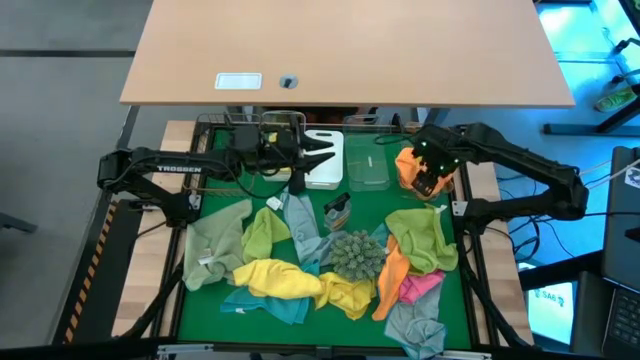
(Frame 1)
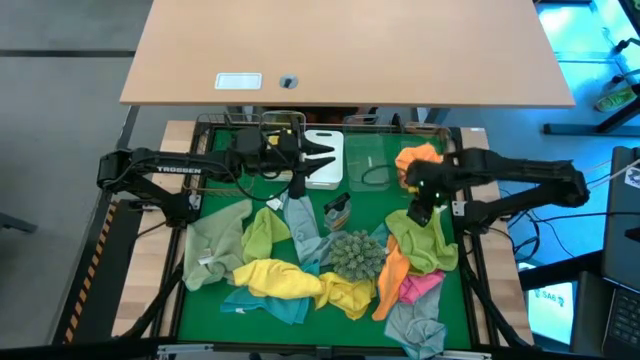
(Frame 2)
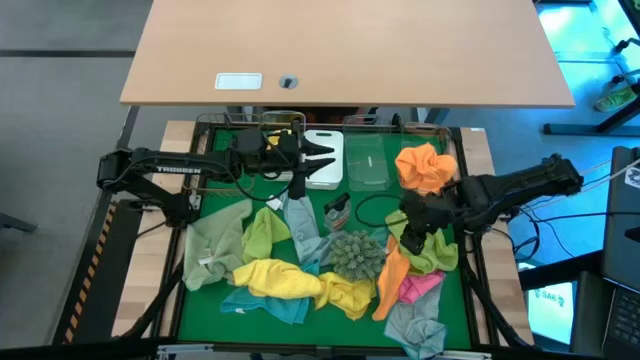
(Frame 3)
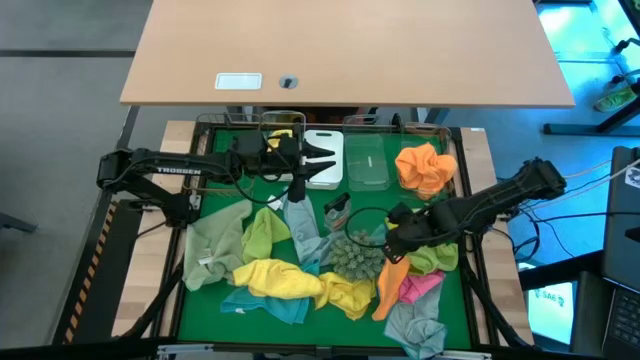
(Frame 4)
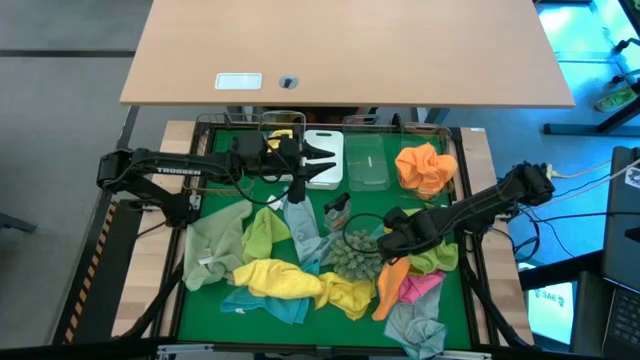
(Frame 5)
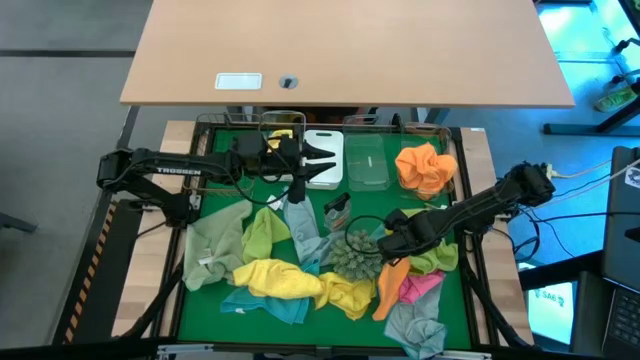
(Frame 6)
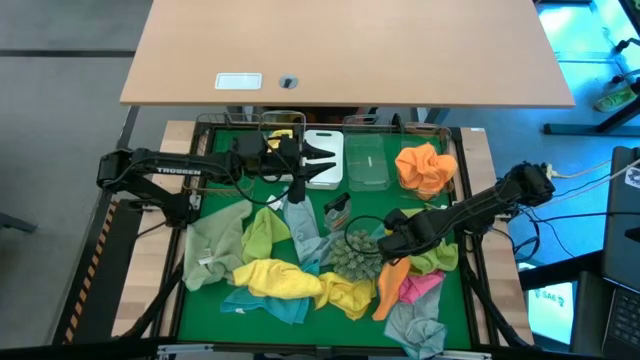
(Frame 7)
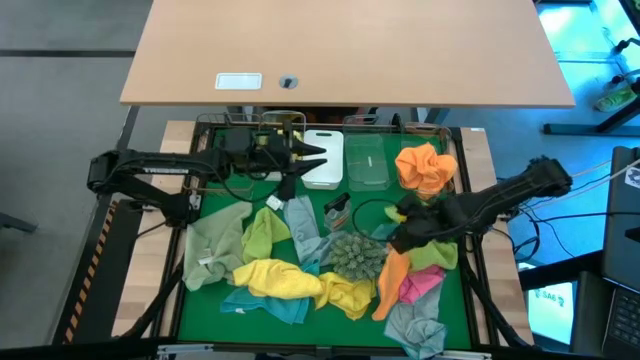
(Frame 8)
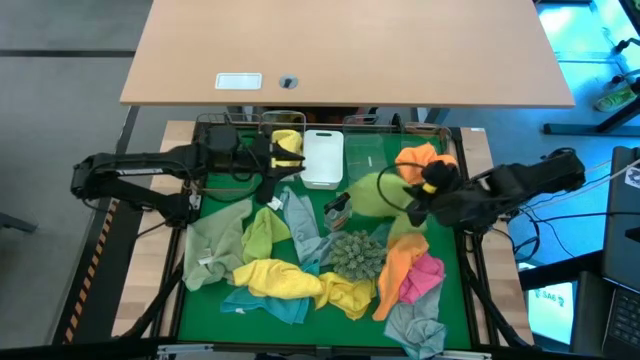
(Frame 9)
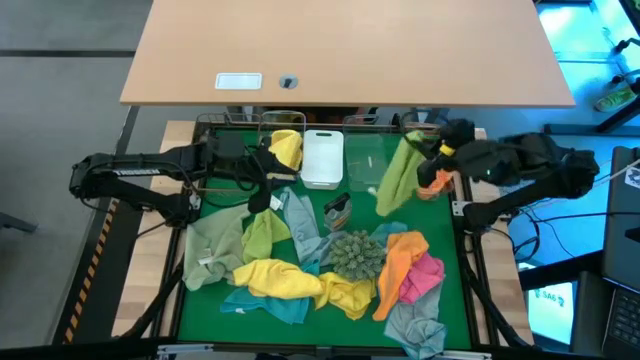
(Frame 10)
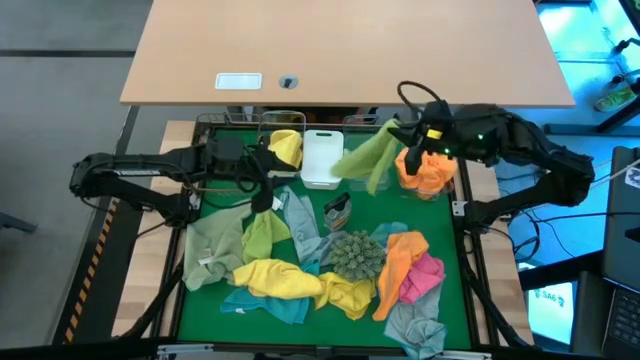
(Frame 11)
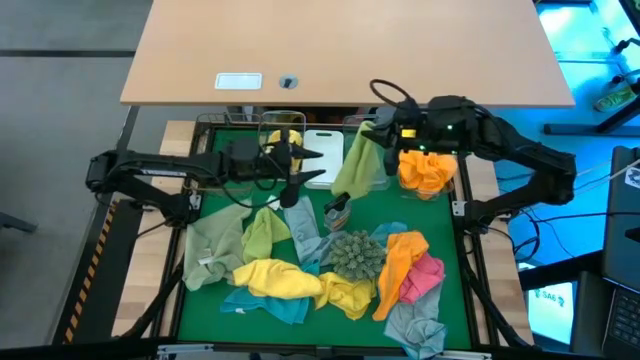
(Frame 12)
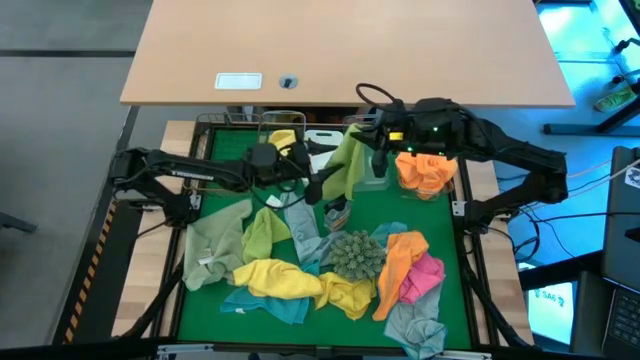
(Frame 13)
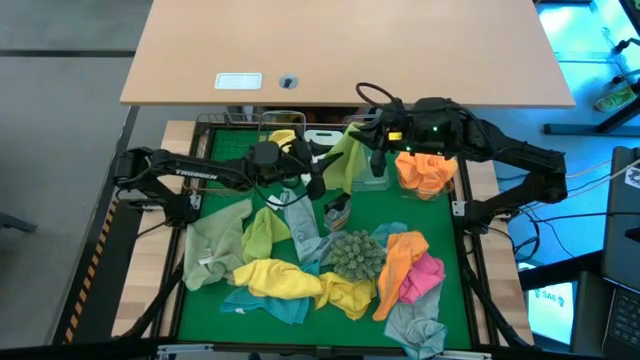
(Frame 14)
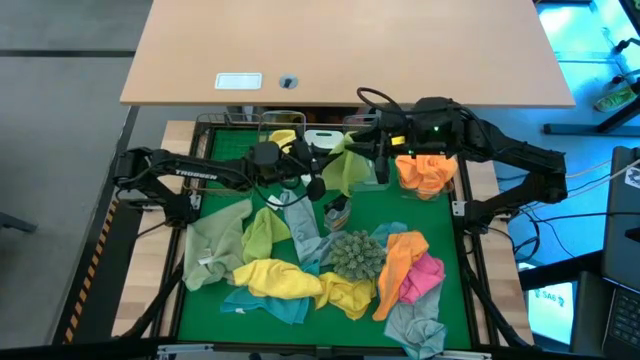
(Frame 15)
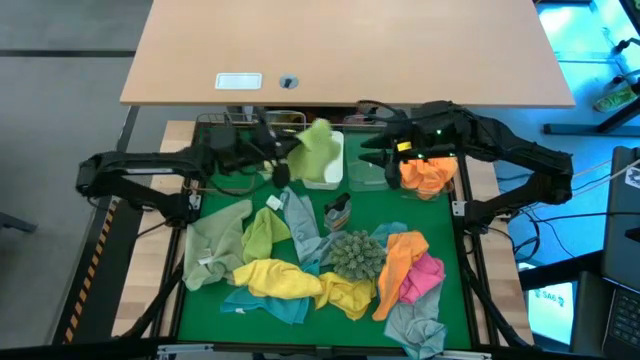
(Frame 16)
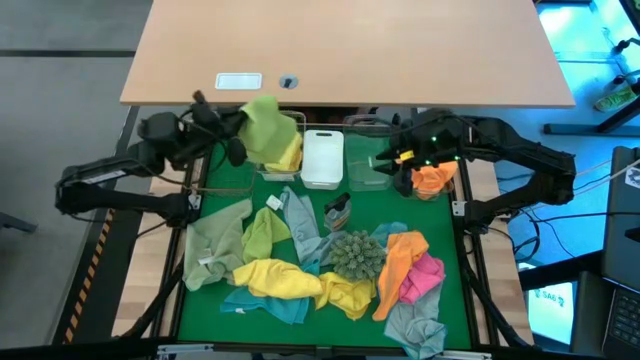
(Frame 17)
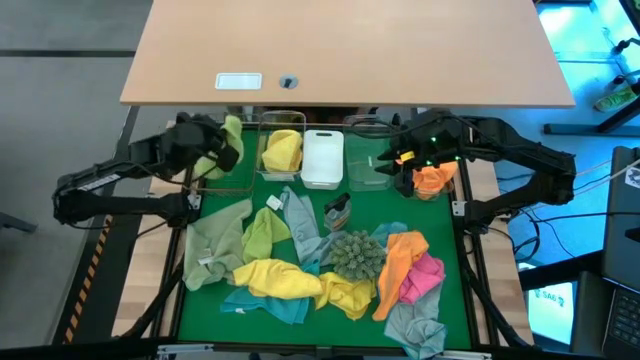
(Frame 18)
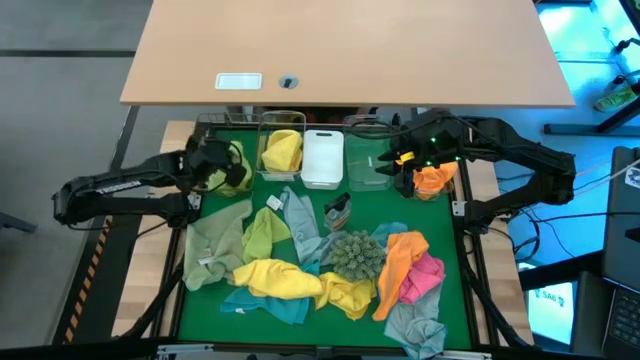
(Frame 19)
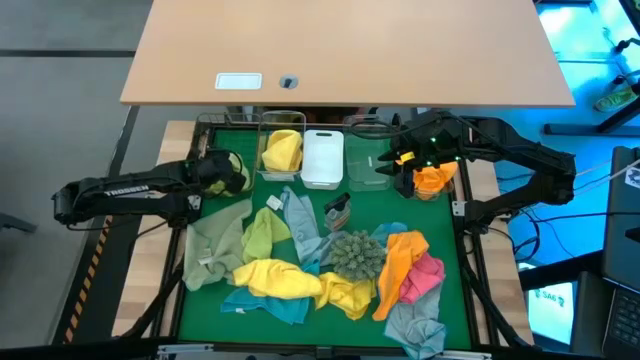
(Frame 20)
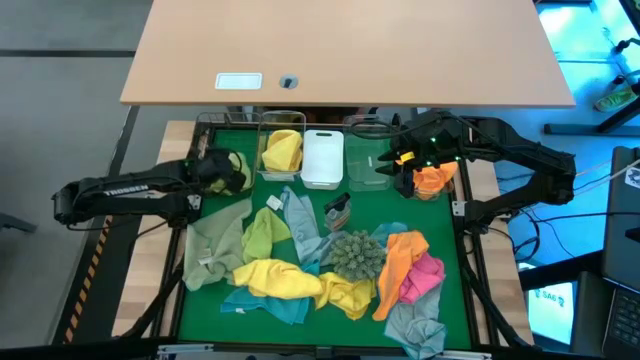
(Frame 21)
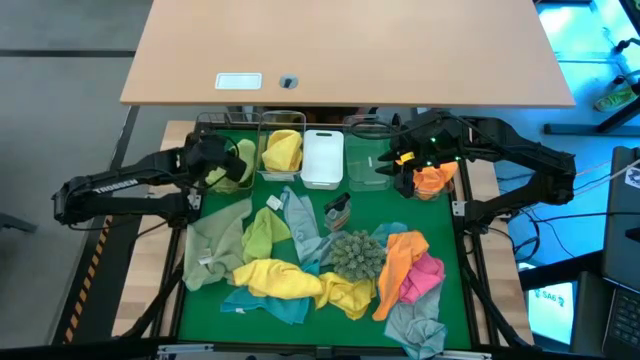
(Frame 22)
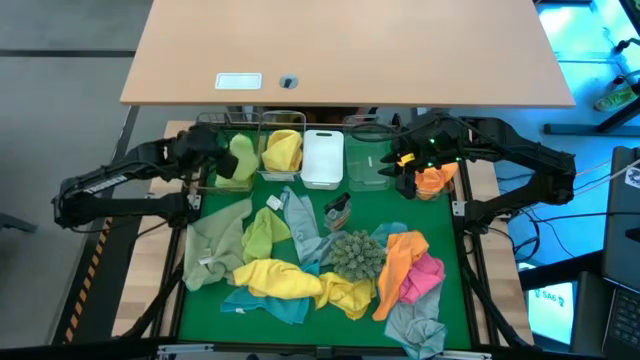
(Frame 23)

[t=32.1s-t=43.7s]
Task: Sort microfiber towel by color & place in baskets
Put the right green microfiber towel into the gold wire basket

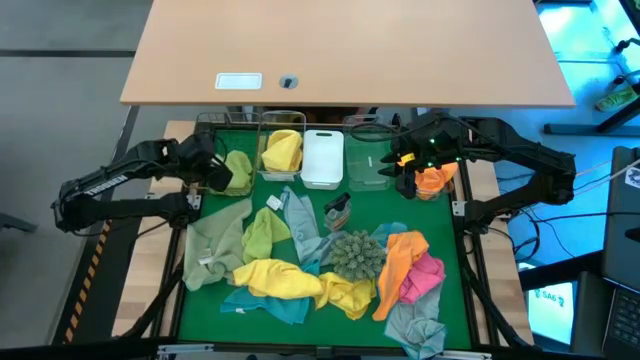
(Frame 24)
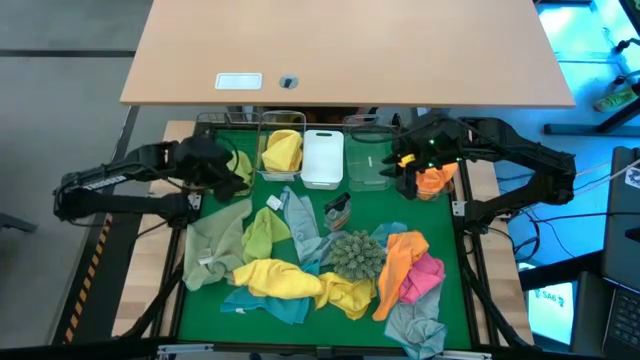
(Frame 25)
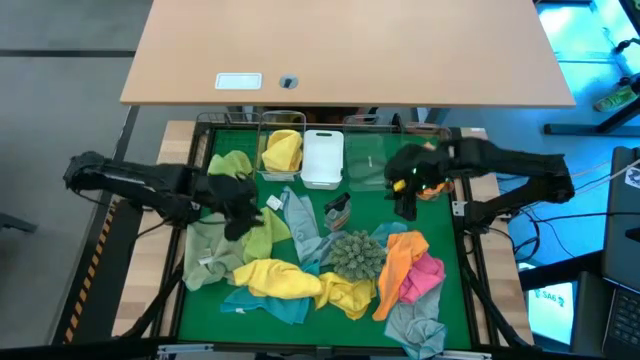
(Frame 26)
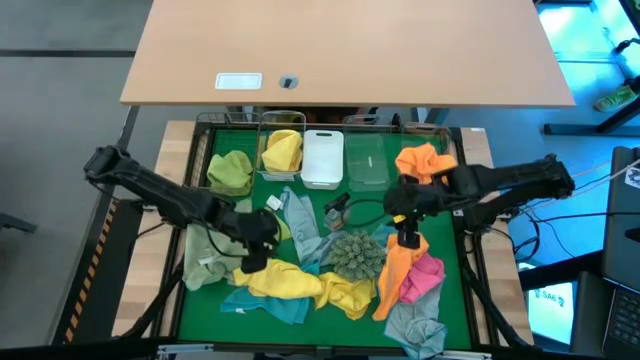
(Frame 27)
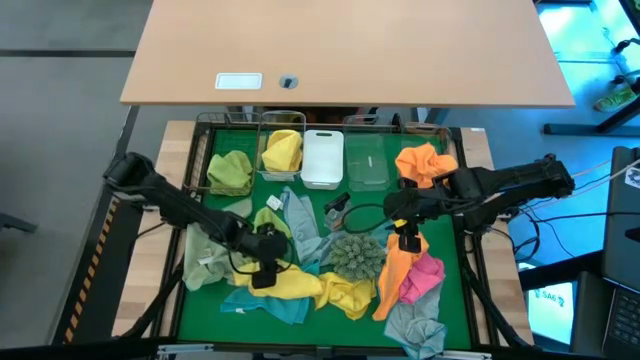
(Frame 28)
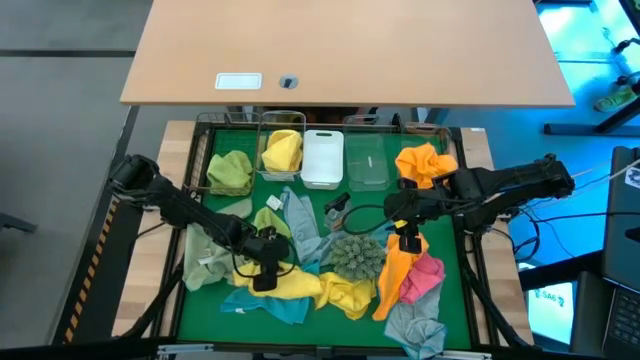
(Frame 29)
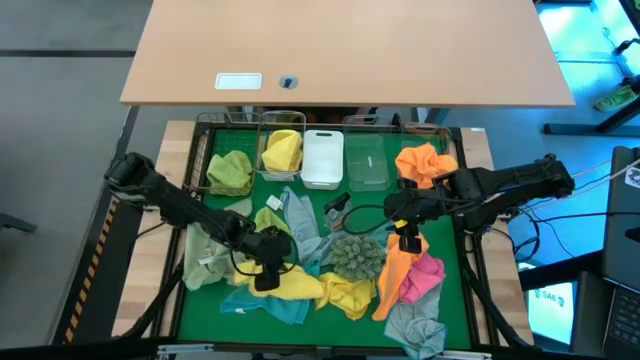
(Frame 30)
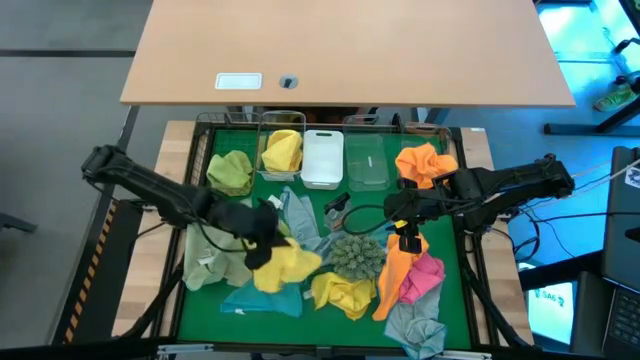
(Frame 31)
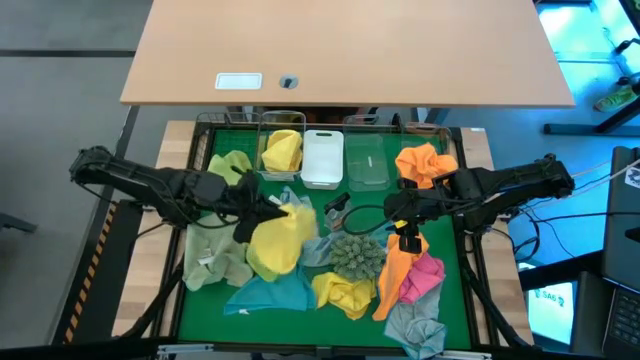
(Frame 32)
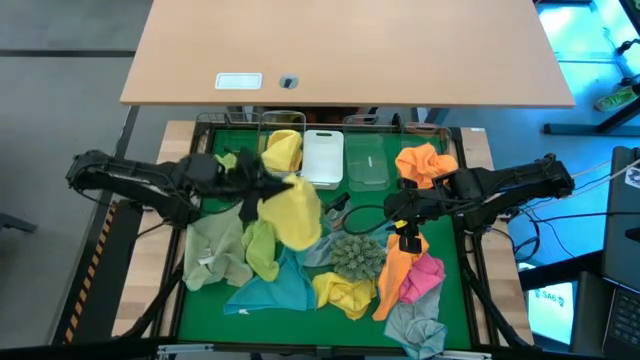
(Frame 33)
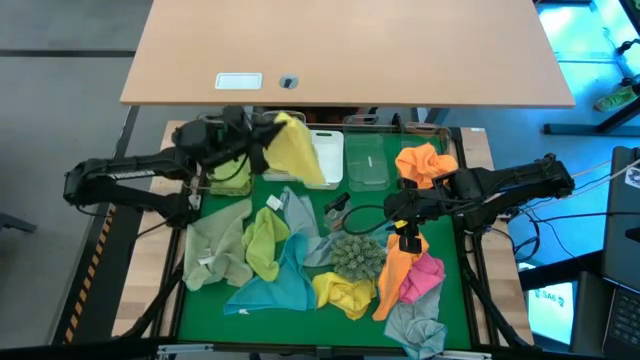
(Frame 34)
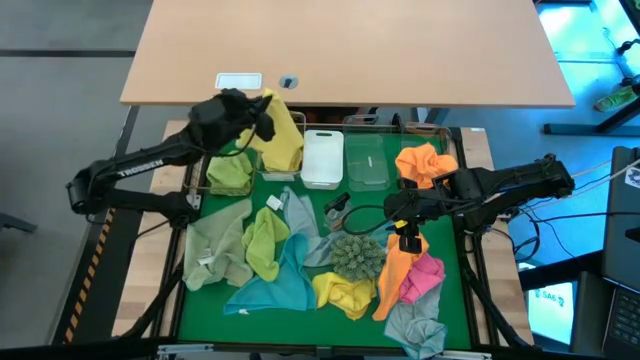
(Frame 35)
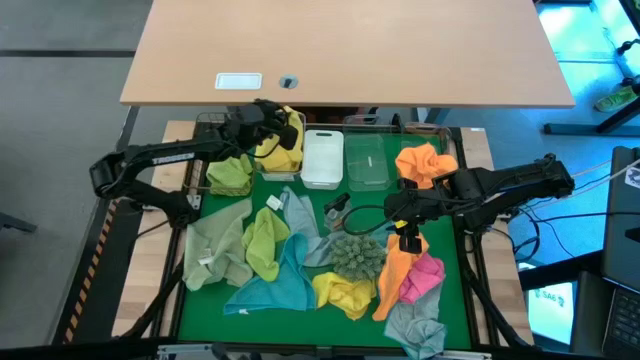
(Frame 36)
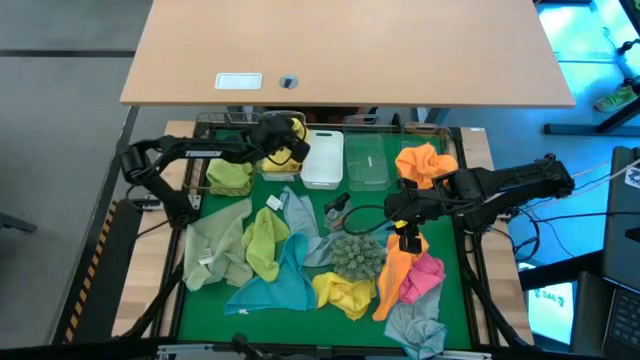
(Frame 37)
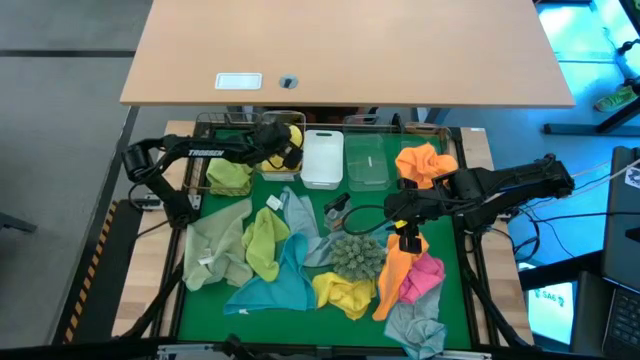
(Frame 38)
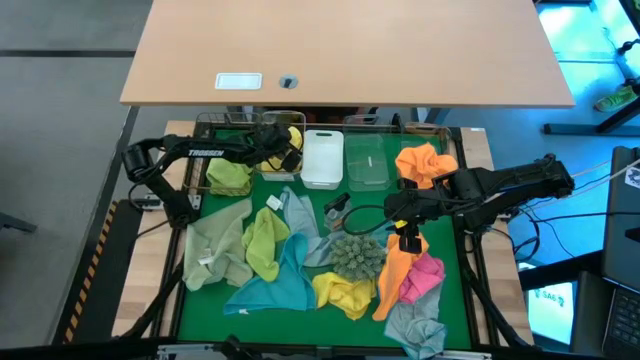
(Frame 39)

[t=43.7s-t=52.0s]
Put the left yellow microfiber towel into the left transparent bin

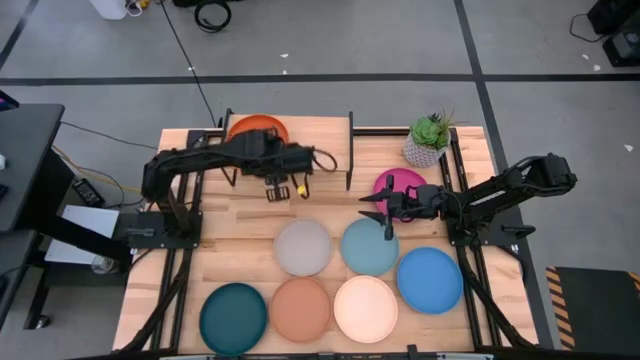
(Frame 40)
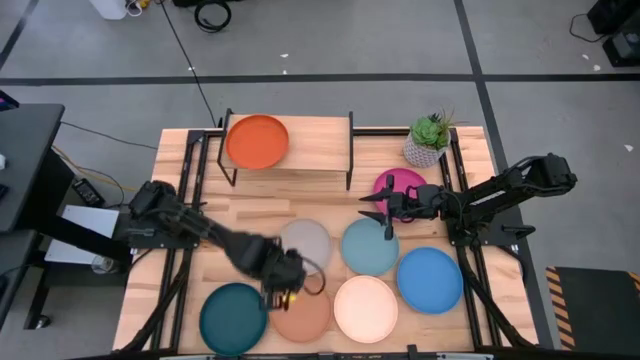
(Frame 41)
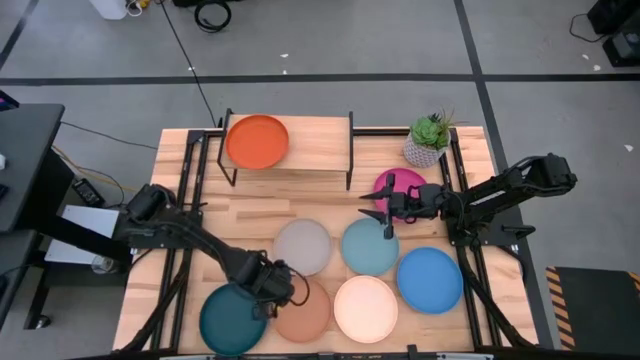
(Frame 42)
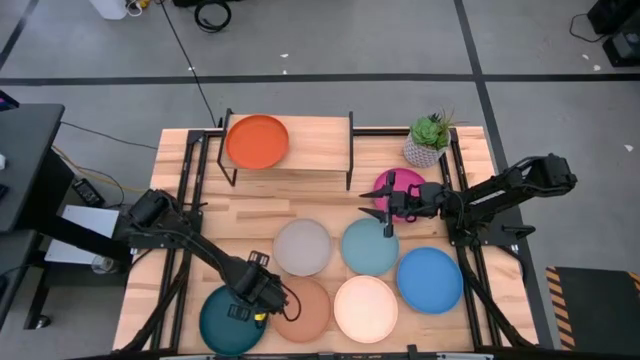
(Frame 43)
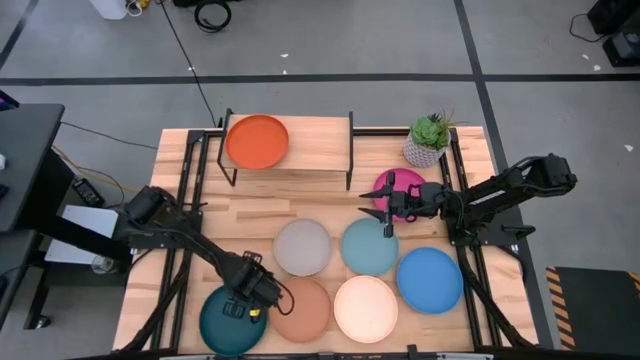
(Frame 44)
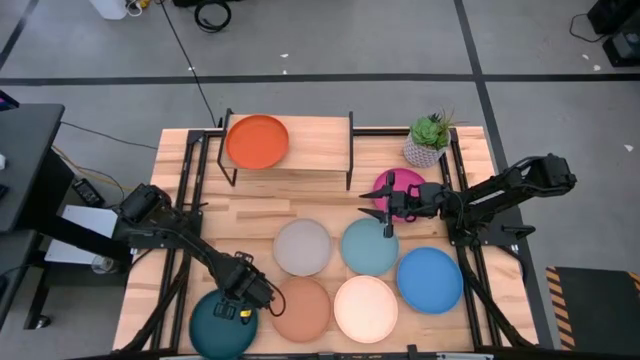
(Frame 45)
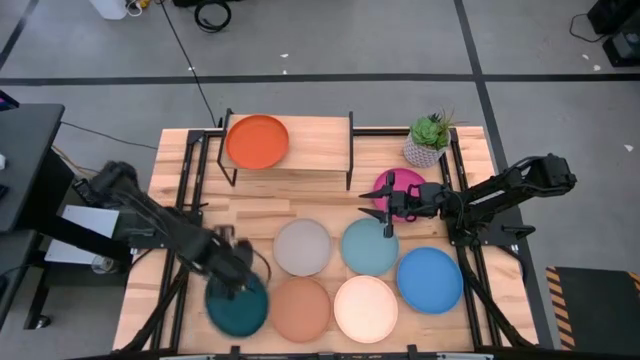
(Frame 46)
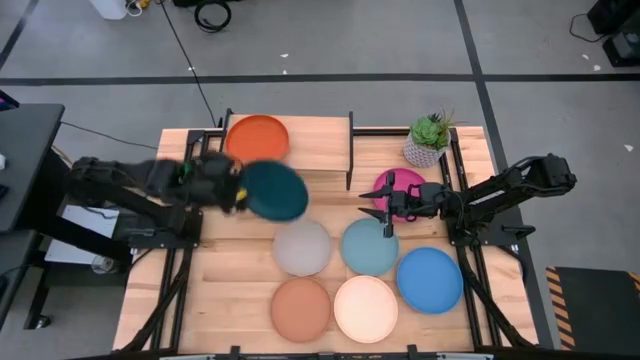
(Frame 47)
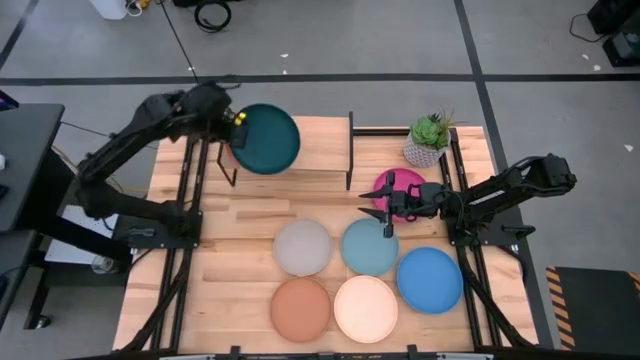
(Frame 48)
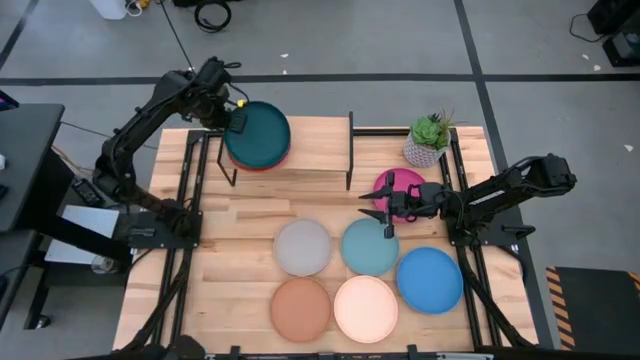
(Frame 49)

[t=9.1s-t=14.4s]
Task: Place and stack plates onto a shelf
Stack the dark blue plate on the top of the orange plate
